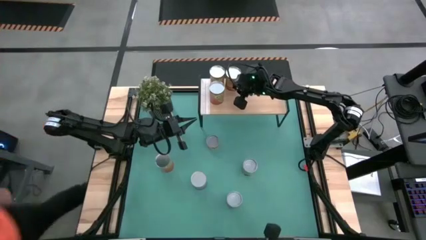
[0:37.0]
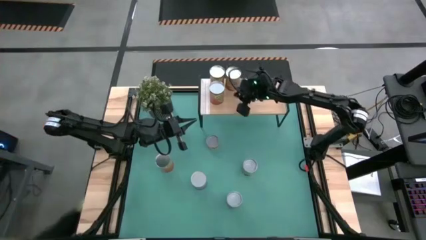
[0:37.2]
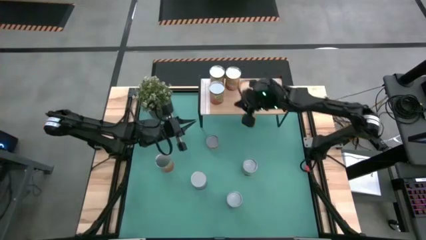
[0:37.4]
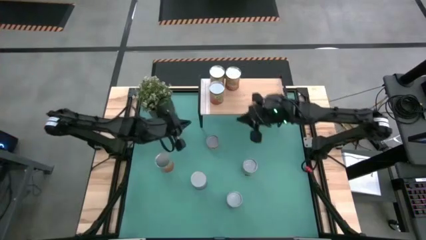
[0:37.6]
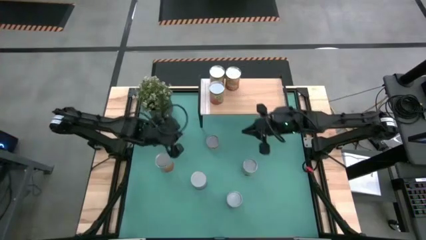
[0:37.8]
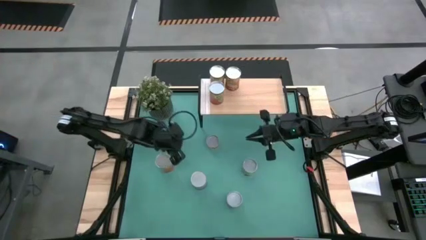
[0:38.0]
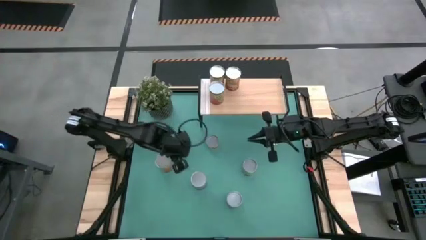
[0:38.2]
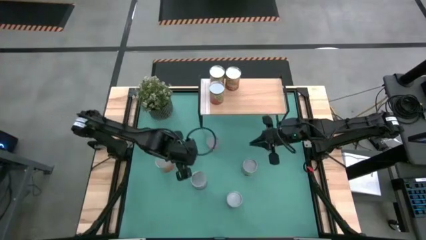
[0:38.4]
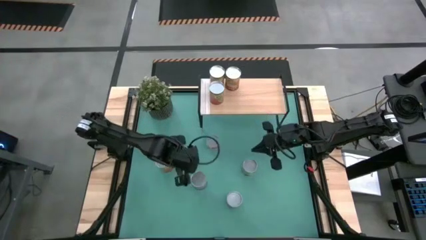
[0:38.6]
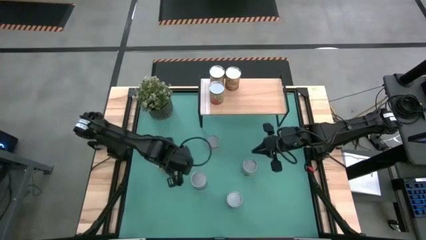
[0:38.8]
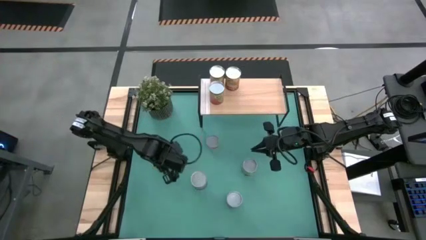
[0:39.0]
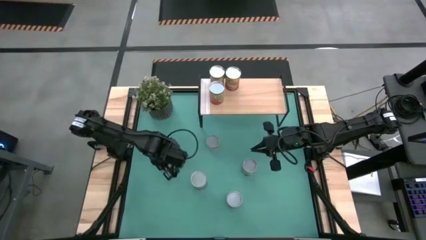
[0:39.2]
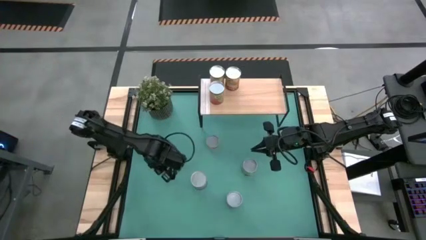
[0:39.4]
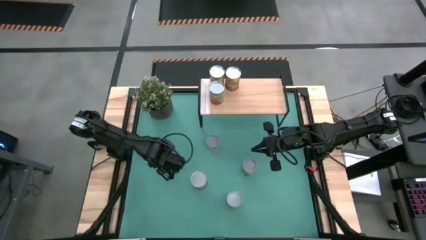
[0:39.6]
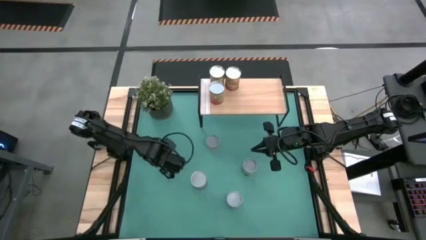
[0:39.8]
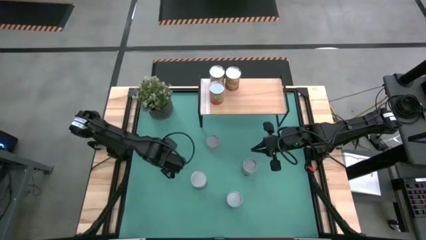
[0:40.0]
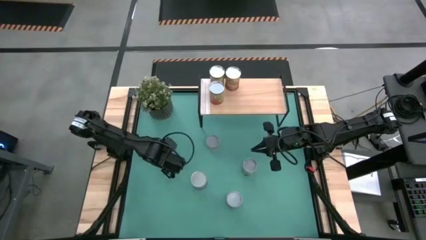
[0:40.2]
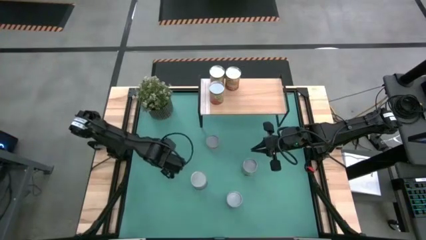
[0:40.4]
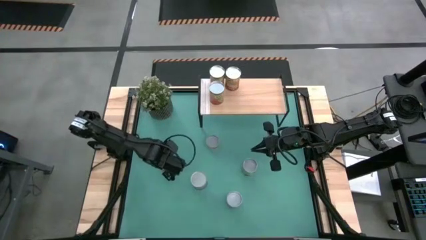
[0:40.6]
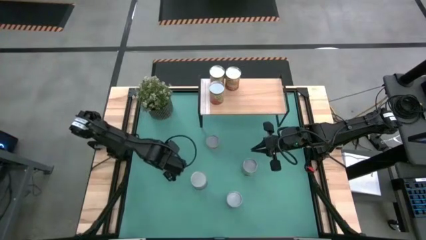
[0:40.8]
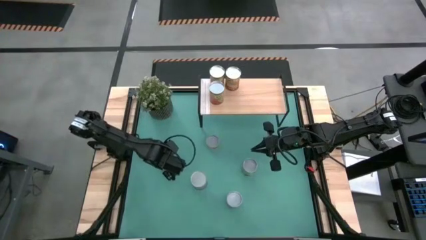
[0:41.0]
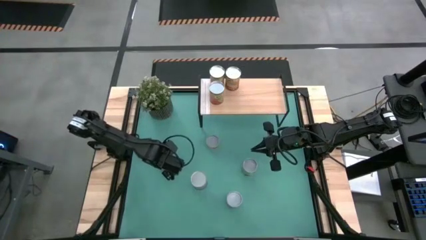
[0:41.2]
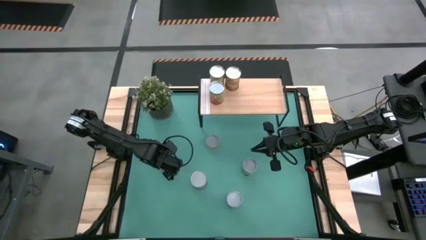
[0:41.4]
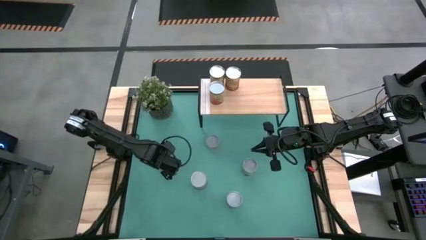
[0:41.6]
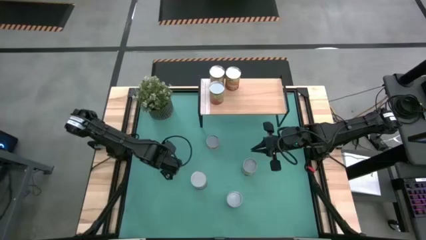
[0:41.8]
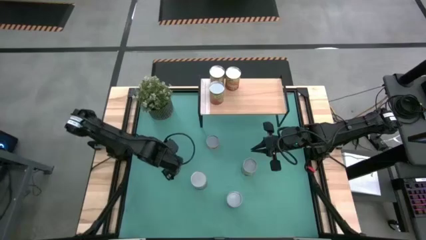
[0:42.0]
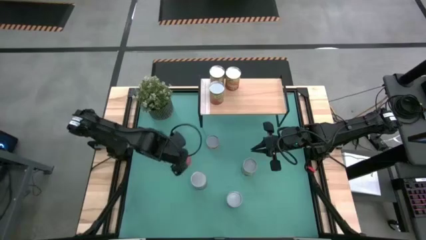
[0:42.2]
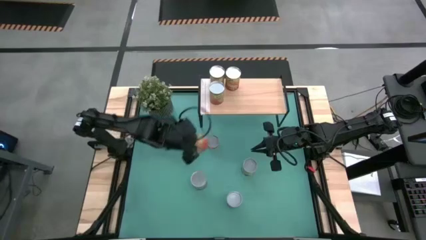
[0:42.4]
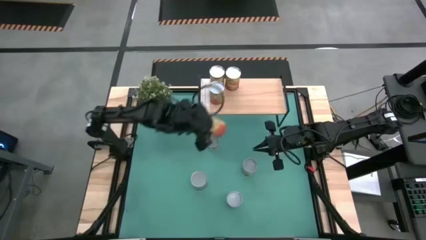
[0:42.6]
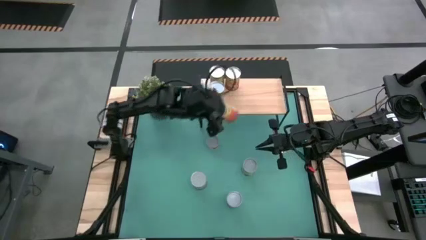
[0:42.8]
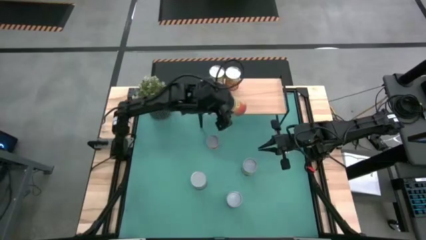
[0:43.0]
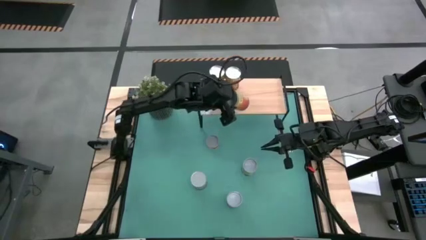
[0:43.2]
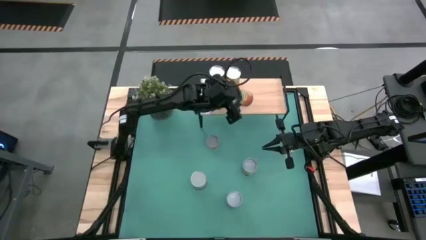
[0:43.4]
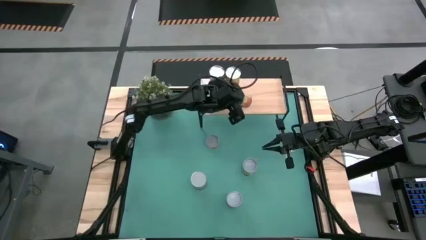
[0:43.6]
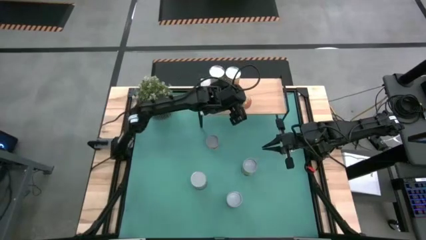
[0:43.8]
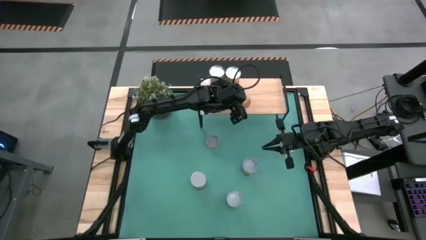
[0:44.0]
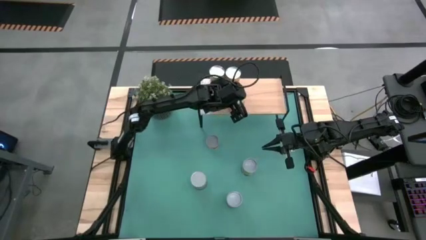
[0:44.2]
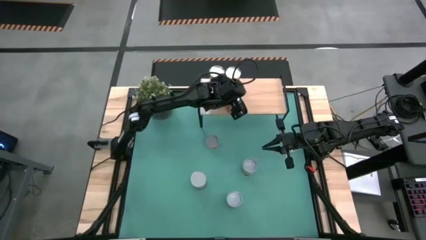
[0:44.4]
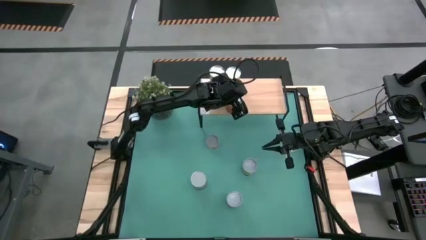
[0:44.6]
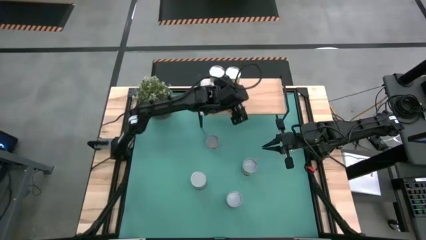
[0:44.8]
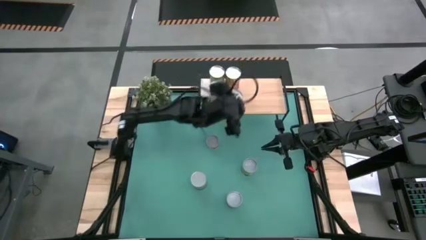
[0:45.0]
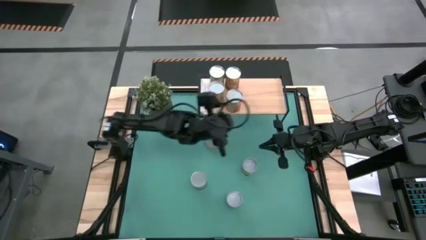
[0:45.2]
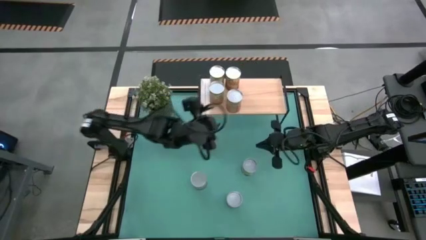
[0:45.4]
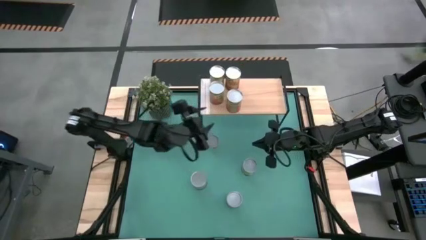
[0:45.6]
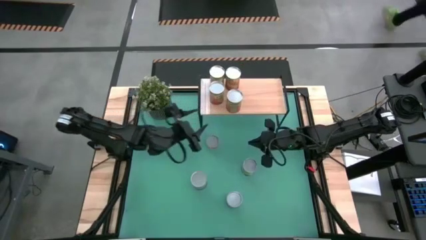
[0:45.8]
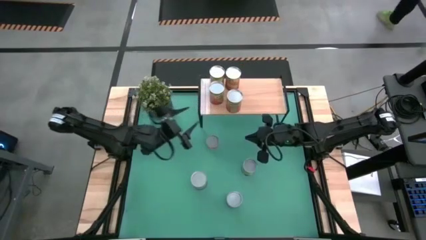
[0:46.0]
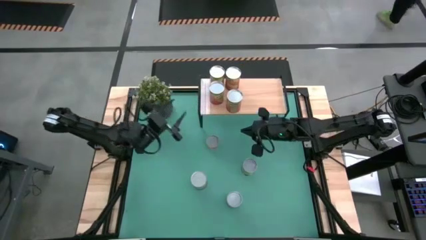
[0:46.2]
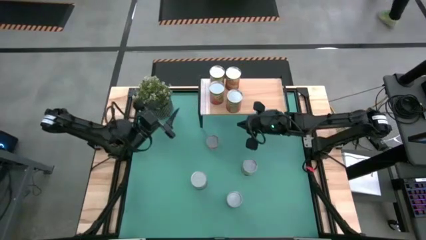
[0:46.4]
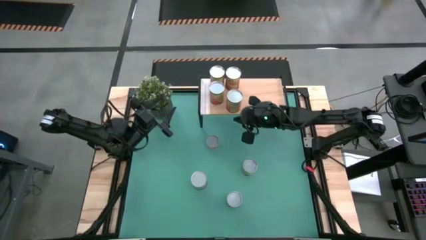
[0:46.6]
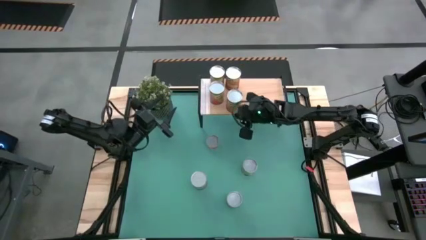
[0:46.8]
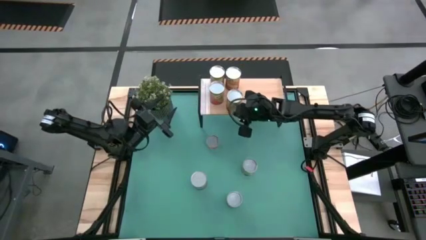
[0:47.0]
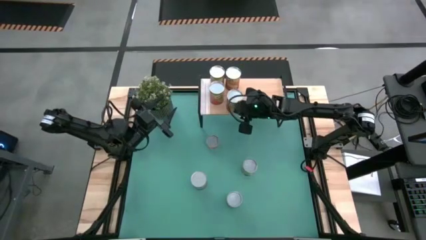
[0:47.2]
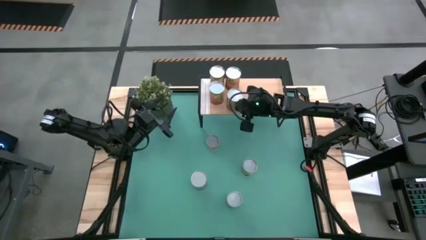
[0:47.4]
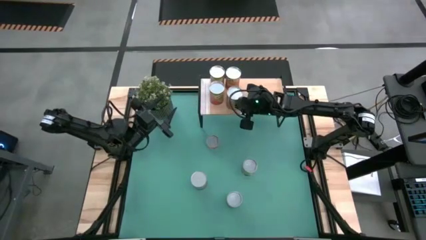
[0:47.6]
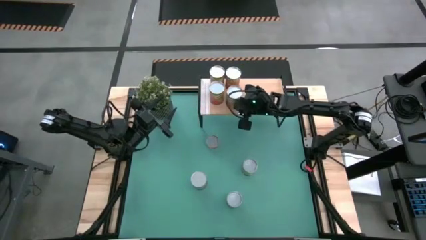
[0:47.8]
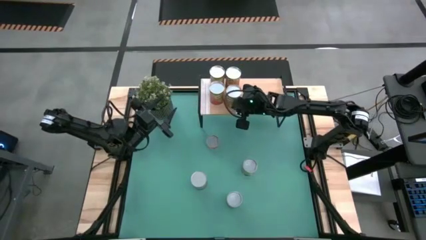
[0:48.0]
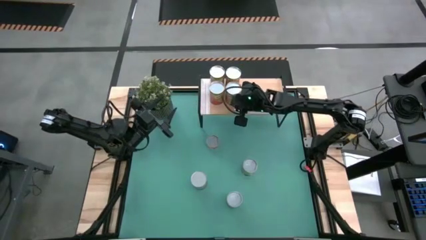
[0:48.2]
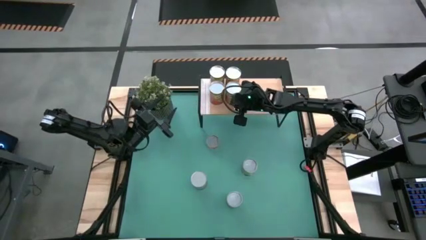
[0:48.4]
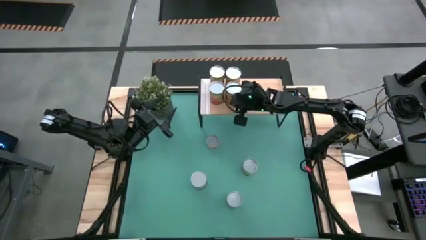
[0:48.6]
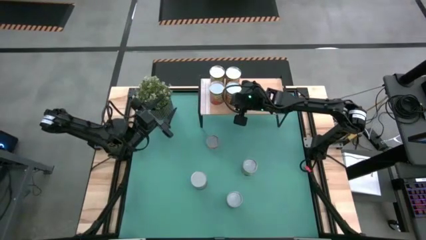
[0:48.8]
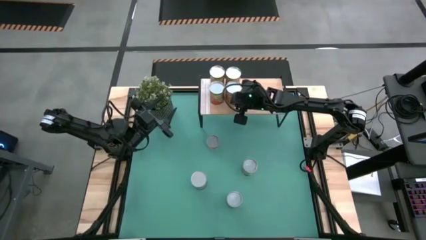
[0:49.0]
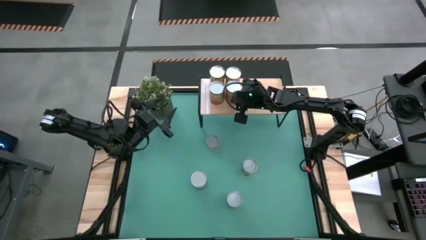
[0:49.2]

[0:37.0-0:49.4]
Task: Pick and place cans onto a shelf
Put the canned pineapple on the shelf
